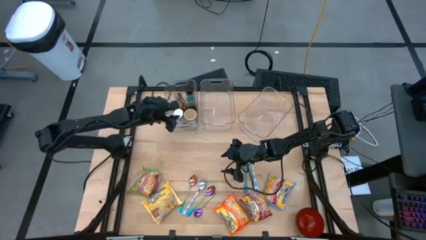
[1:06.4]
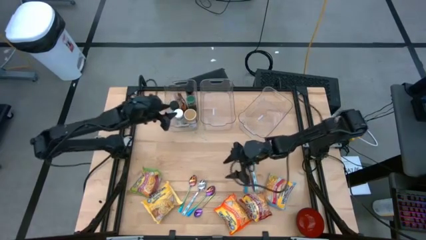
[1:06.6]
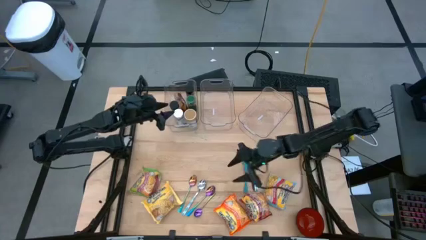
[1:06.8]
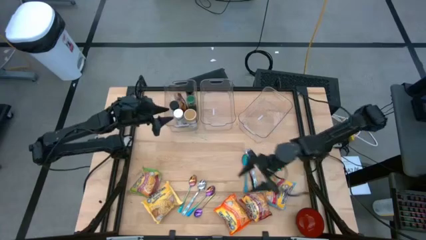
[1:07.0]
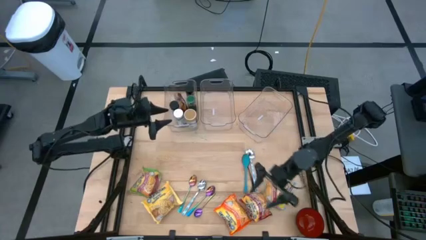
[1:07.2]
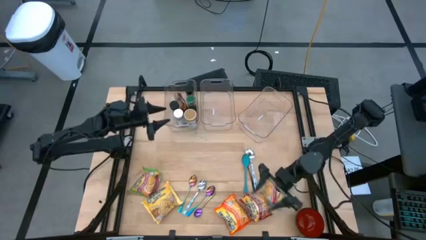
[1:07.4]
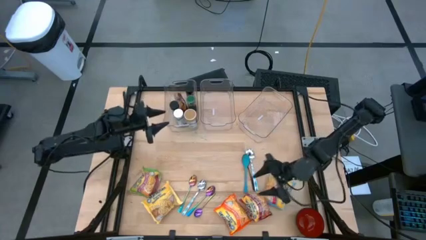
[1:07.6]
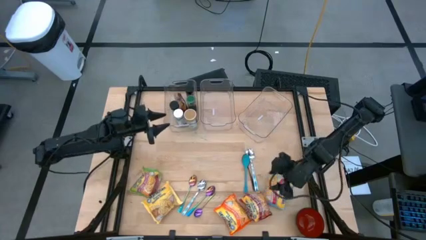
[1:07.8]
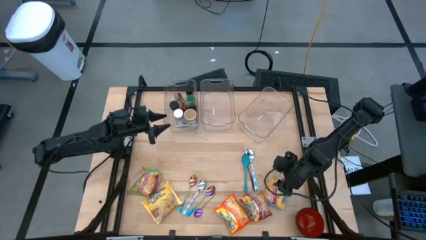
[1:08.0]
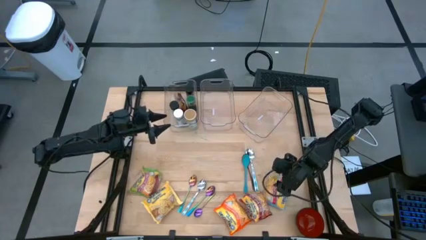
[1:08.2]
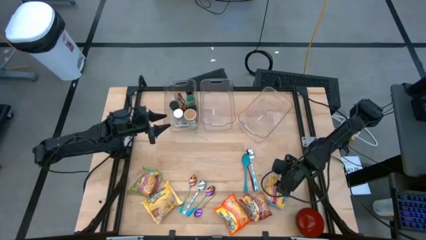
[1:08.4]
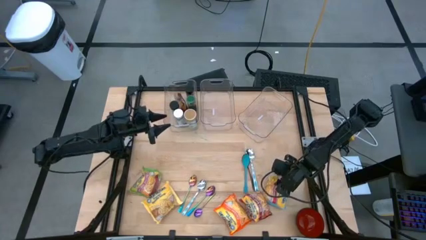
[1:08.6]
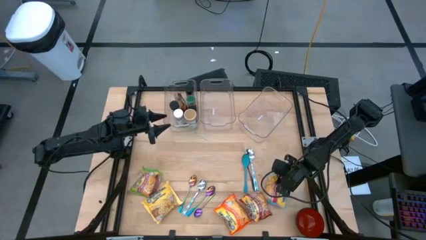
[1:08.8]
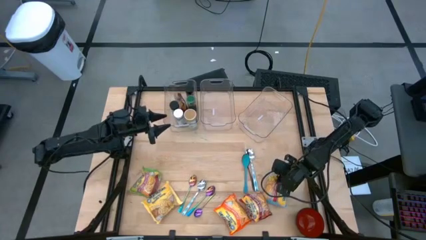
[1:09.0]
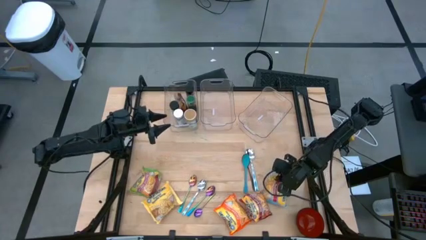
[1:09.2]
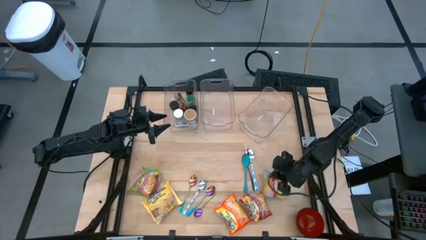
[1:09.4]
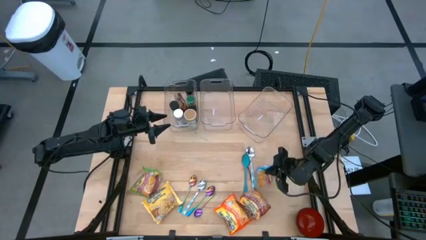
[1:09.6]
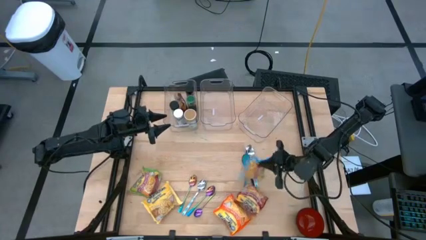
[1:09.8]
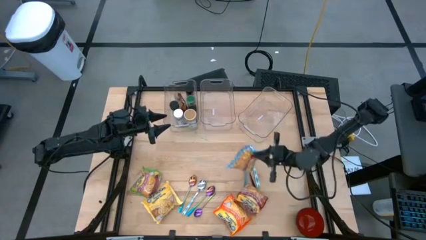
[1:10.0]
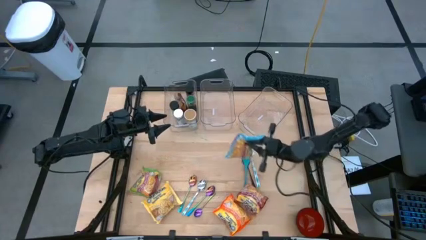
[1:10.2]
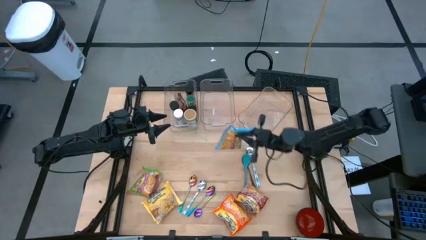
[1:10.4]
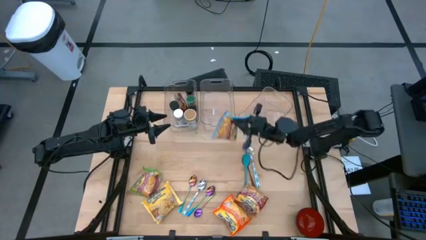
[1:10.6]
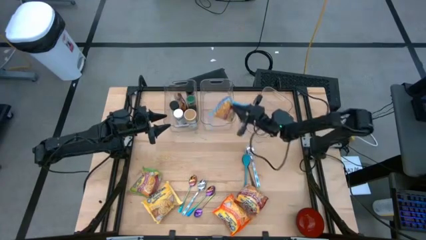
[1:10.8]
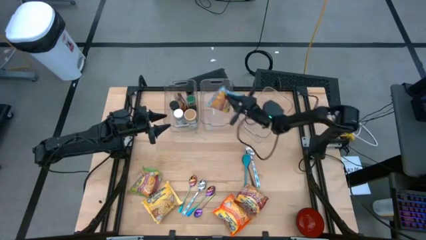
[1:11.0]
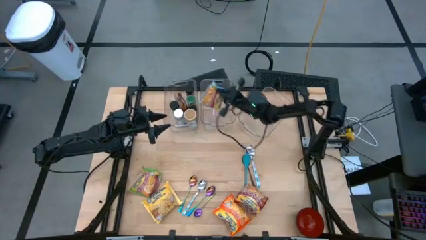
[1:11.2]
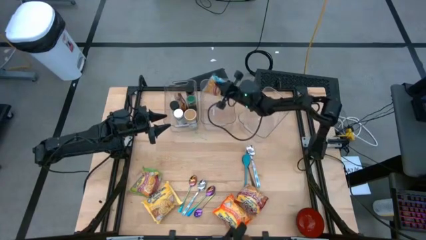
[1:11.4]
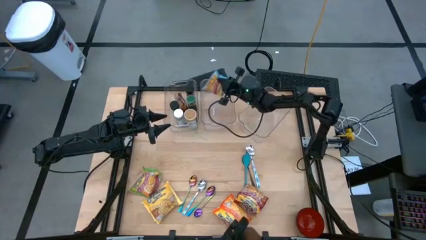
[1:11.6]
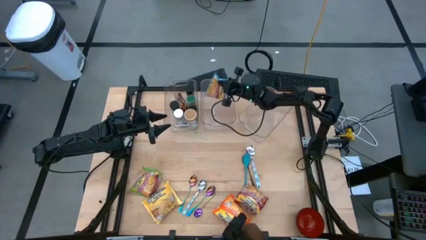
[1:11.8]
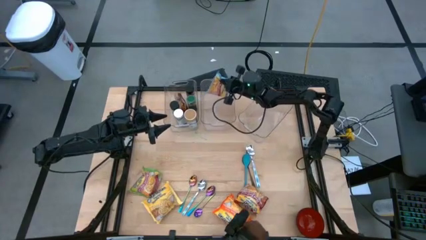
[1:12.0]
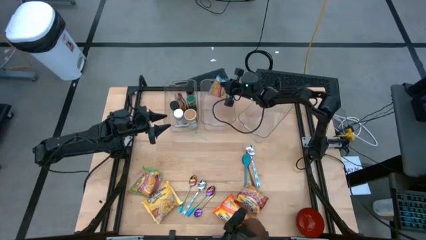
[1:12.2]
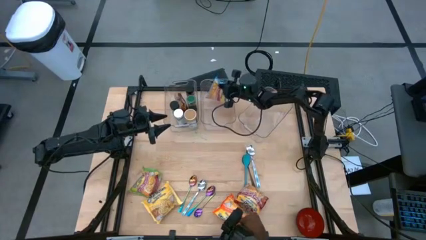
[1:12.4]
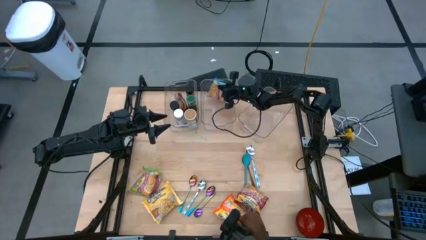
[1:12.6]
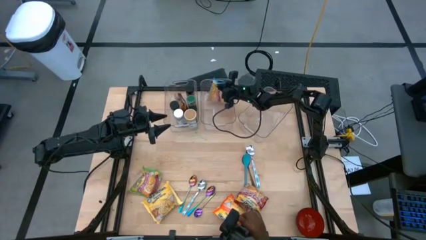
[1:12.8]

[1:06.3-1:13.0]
Task: Pick & Place Food Item
Put the blue noodle pack into the middle transparent bin

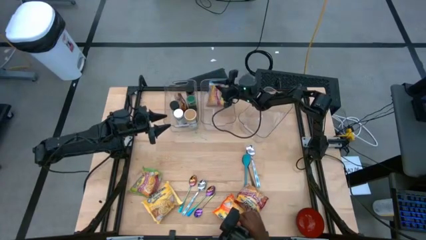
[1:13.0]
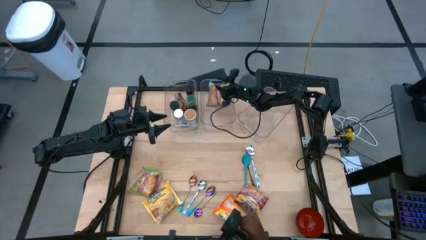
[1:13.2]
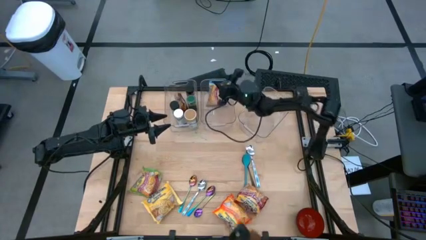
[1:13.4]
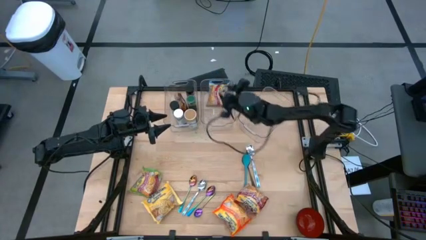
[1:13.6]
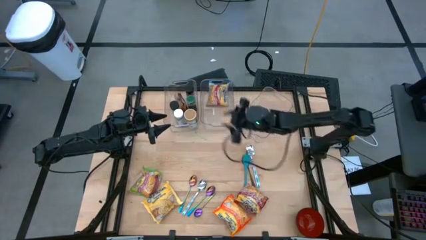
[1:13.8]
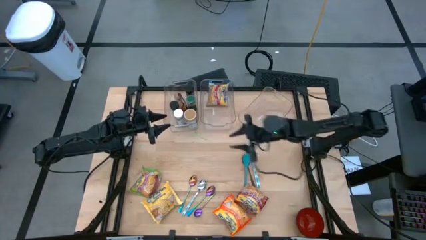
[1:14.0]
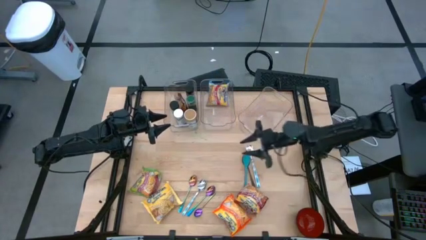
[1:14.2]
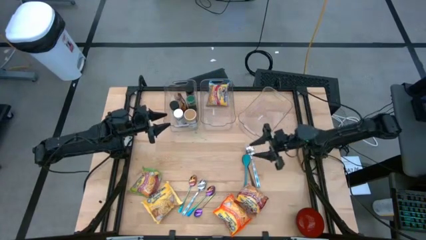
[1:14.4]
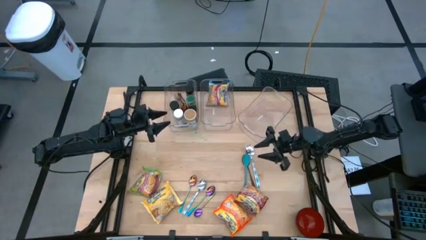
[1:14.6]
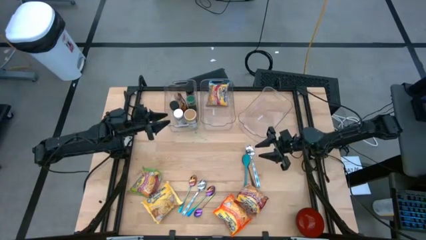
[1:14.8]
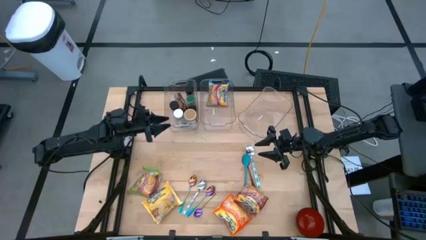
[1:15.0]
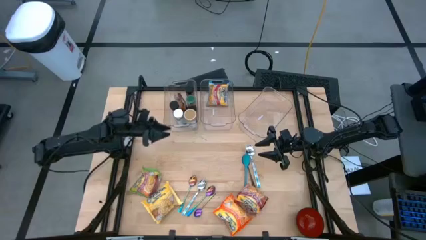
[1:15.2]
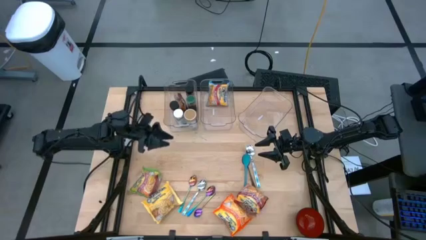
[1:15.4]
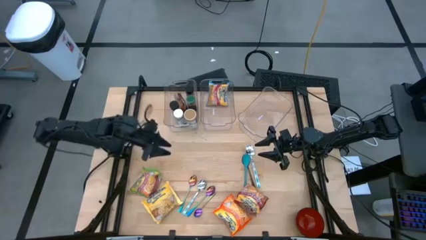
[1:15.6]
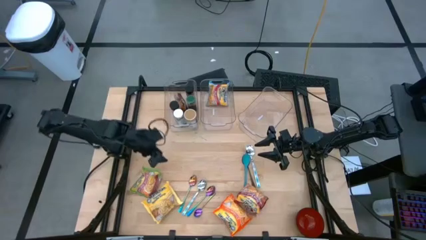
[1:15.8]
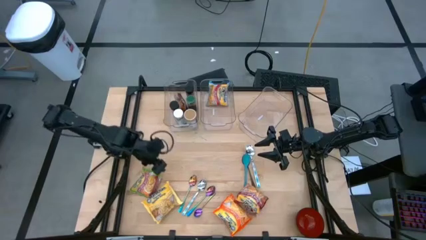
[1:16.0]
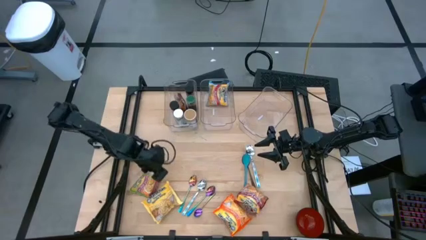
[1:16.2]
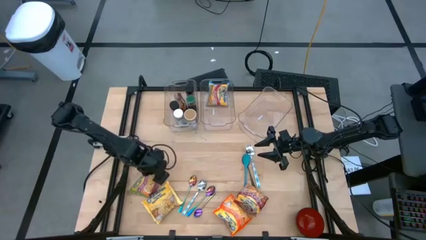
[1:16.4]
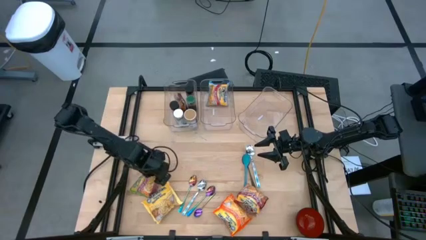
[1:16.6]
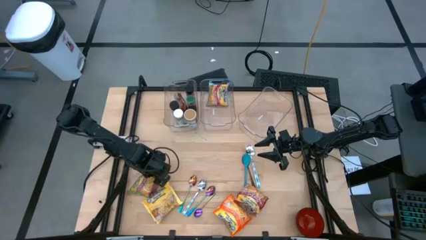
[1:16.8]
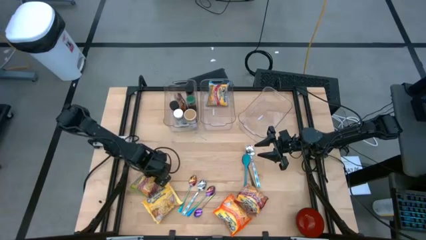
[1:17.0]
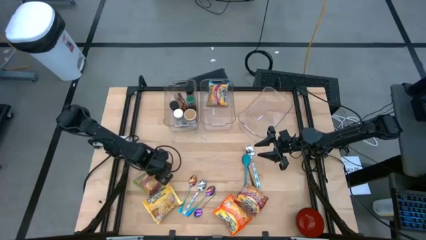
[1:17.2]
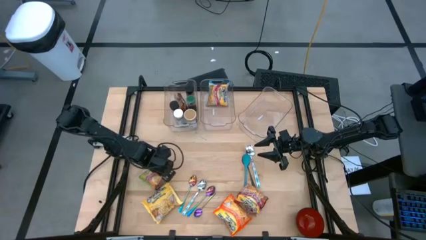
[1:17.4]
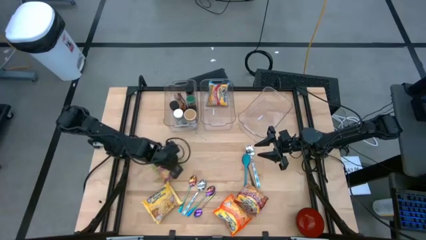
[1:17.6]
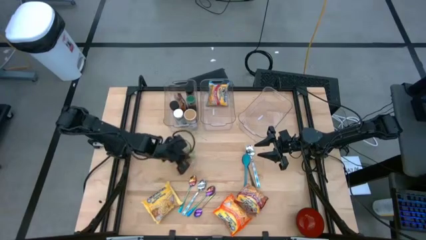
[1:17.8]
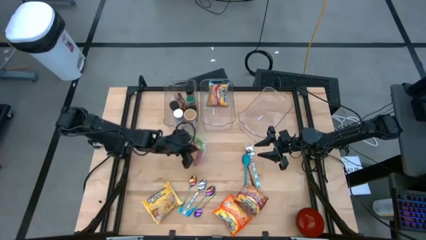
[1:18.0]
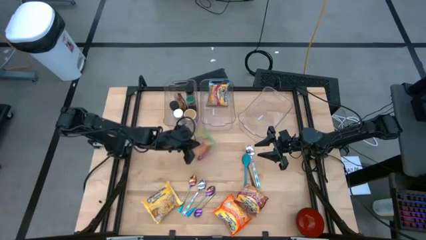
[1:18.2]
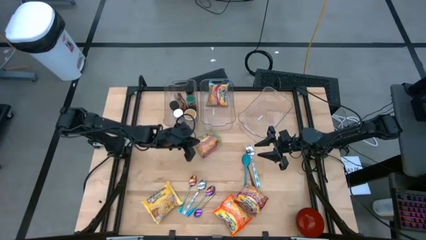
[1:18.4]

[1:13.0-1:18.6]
Put the green noodle pack into the middle transparent bin

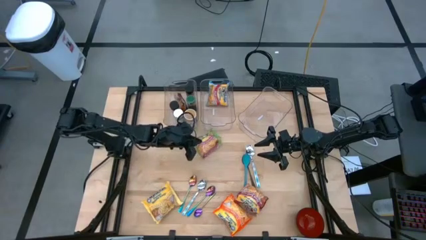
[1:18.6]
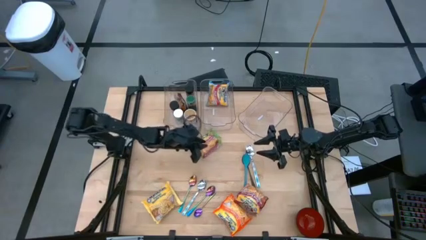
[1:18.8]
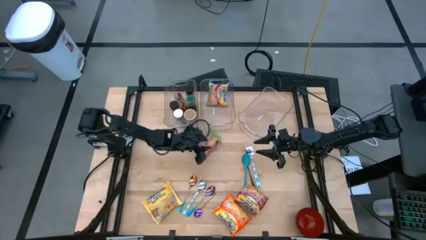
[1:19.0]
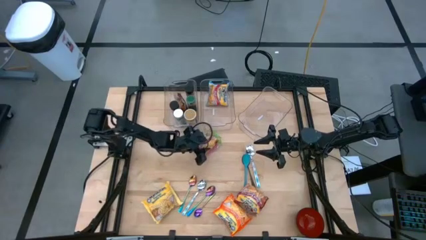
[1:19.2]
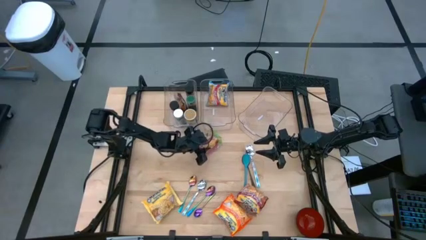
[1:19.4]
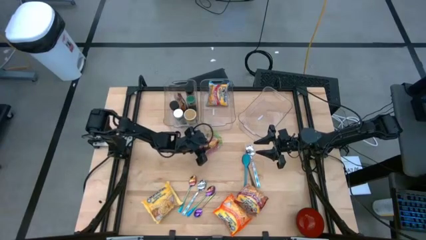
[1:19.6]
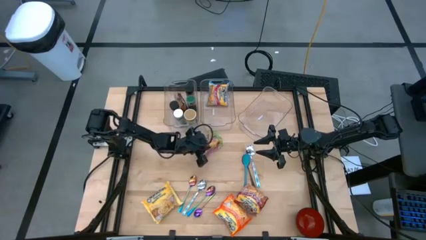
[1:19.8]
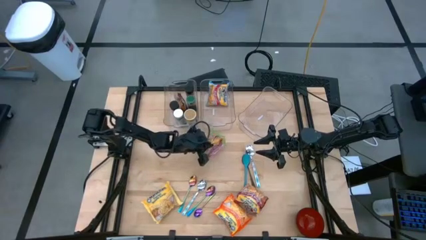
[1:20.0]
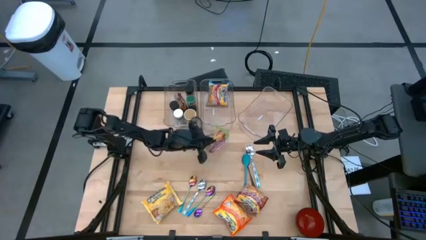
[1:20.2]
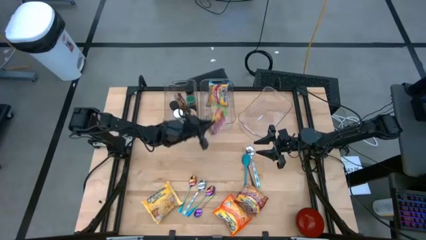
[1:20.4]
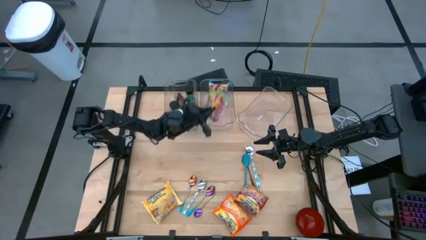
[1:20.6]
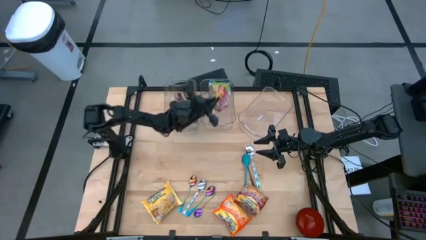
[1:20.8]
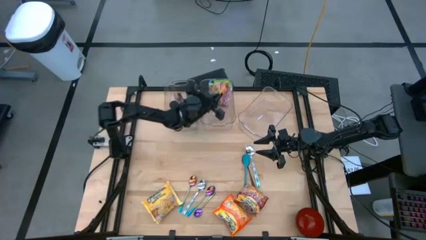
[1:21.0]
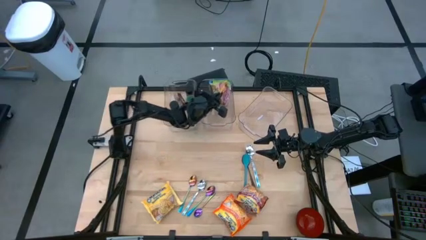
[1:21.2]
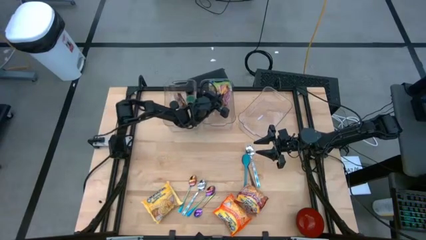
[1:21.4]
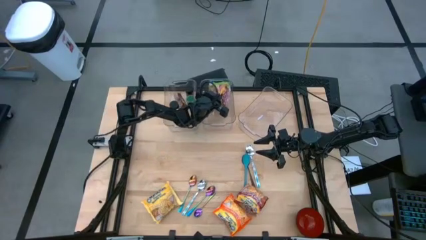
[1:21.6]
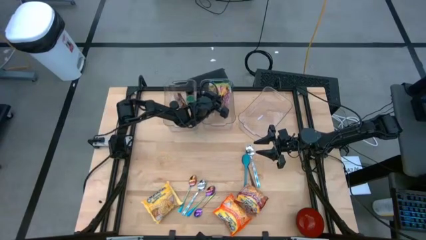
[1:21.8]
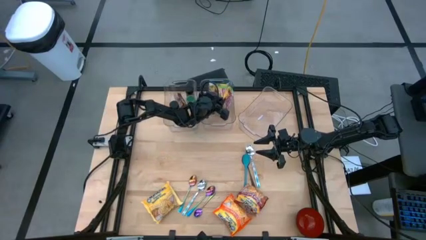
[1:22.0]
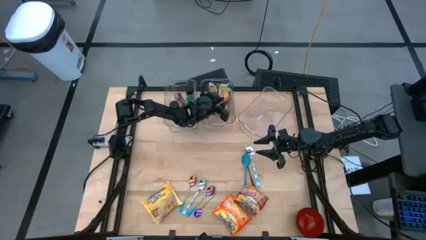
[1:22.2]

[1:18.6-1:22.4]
Put the green noodle pack into the middle transparent bin
